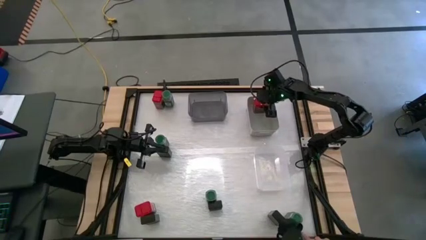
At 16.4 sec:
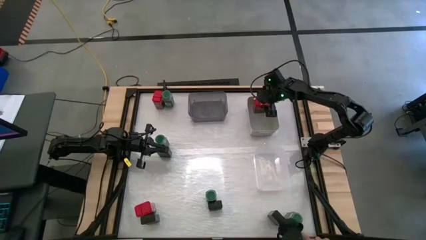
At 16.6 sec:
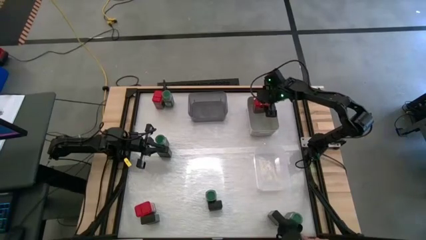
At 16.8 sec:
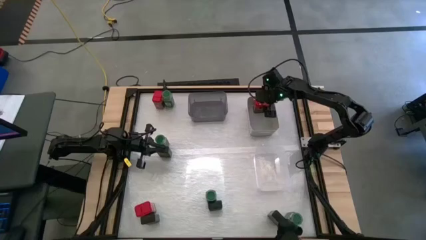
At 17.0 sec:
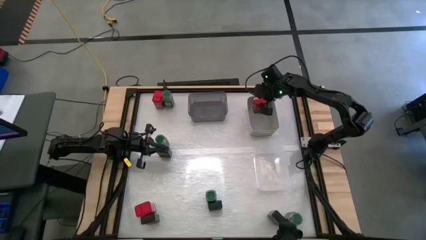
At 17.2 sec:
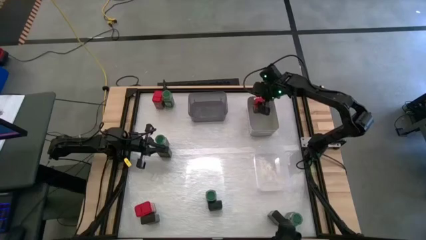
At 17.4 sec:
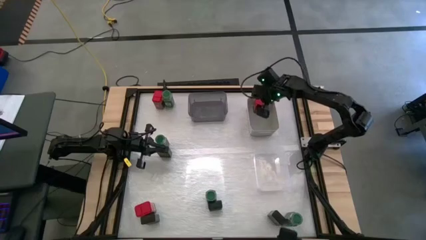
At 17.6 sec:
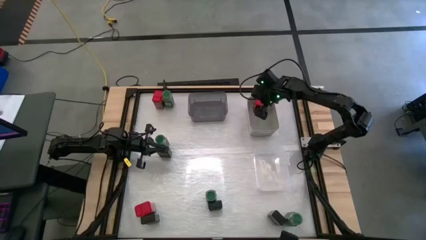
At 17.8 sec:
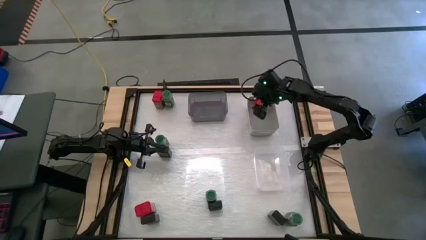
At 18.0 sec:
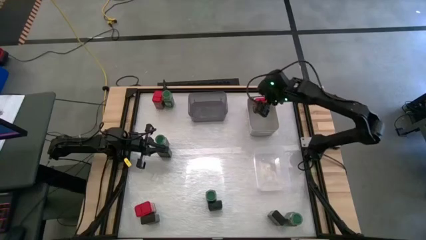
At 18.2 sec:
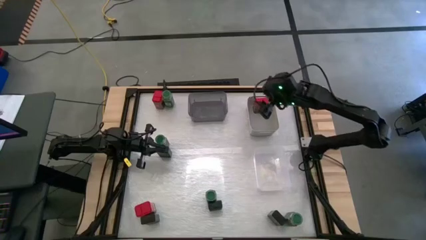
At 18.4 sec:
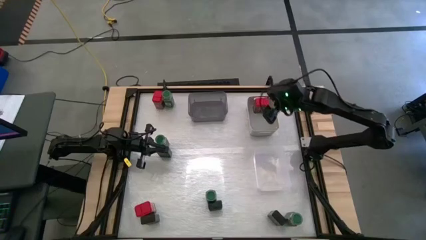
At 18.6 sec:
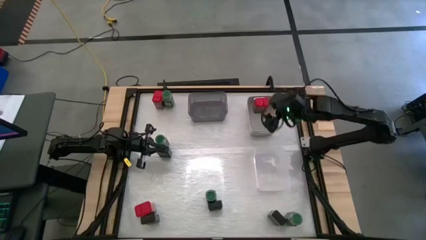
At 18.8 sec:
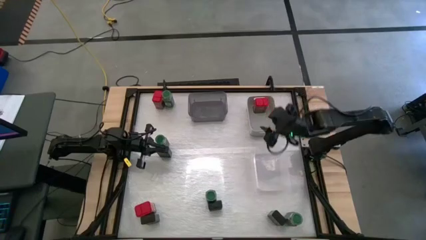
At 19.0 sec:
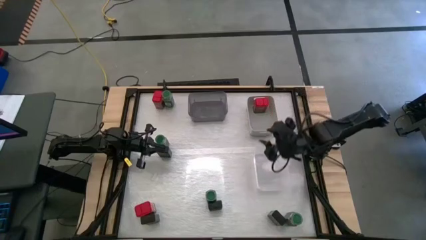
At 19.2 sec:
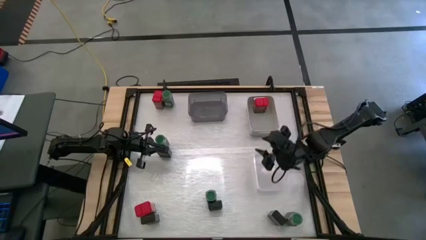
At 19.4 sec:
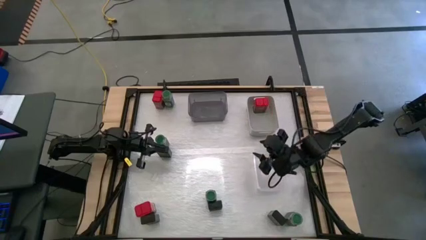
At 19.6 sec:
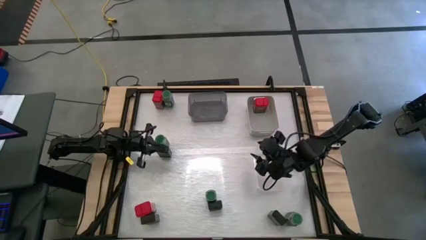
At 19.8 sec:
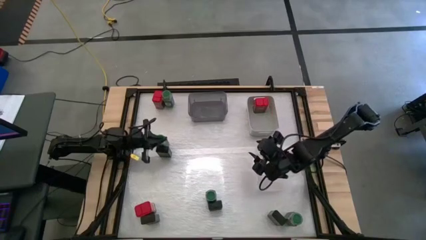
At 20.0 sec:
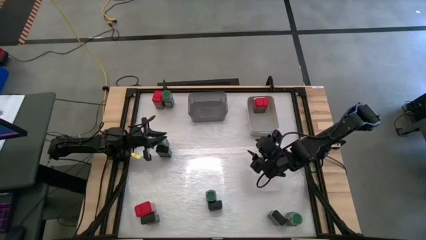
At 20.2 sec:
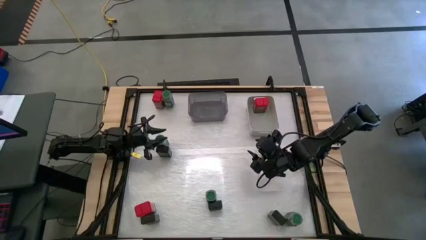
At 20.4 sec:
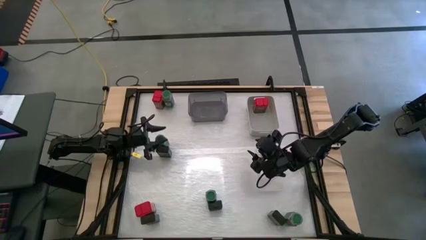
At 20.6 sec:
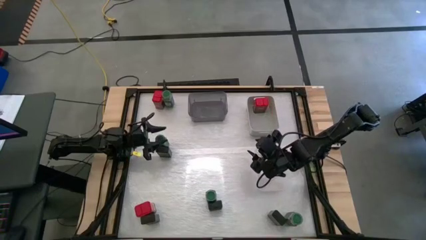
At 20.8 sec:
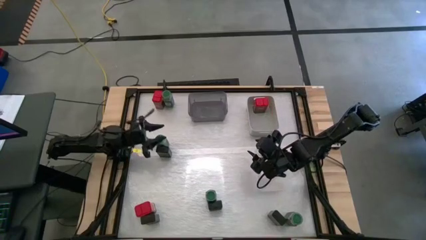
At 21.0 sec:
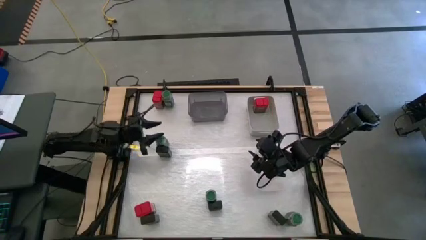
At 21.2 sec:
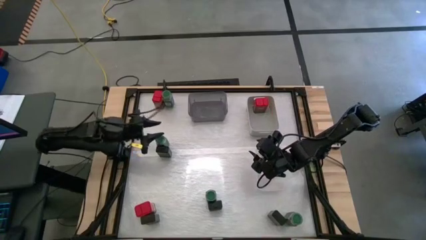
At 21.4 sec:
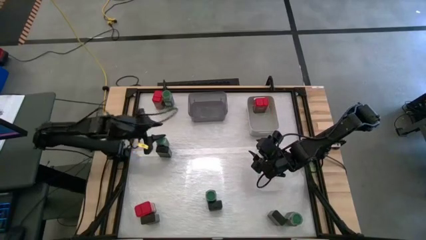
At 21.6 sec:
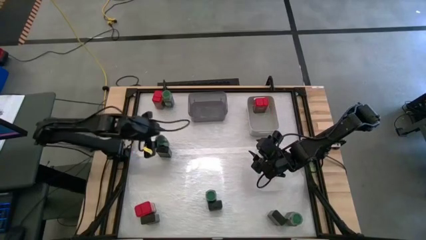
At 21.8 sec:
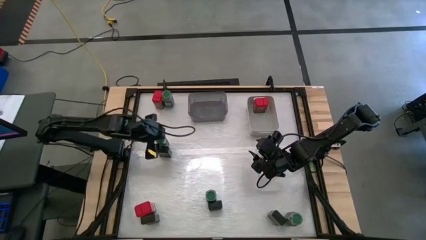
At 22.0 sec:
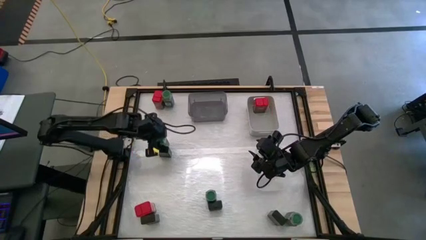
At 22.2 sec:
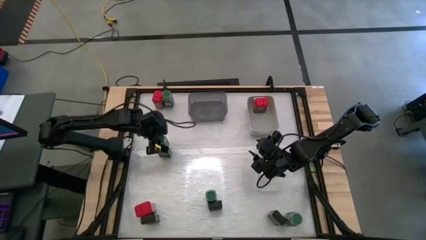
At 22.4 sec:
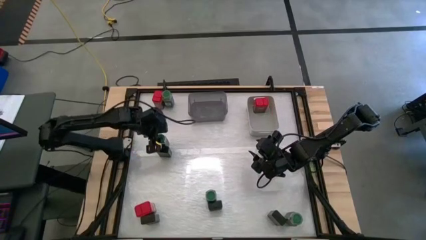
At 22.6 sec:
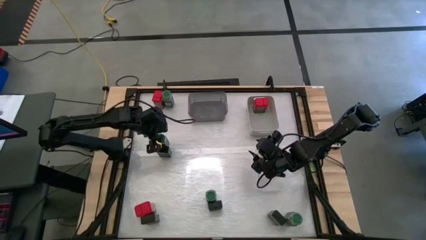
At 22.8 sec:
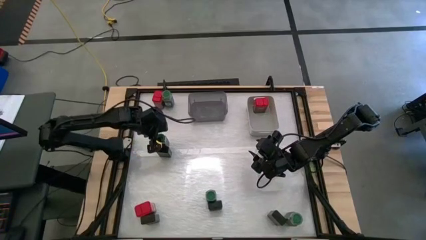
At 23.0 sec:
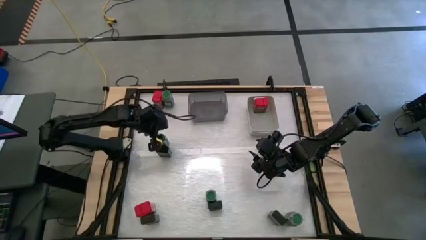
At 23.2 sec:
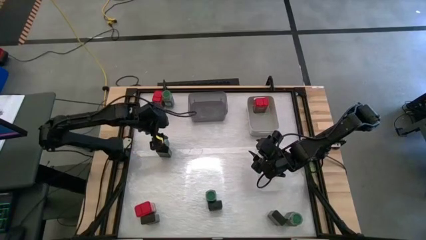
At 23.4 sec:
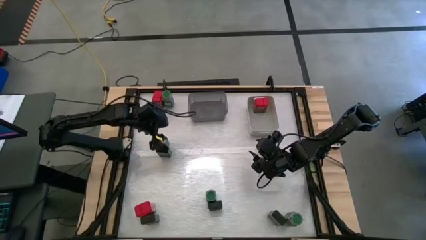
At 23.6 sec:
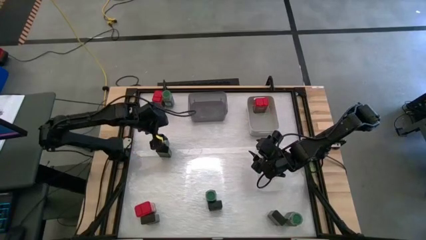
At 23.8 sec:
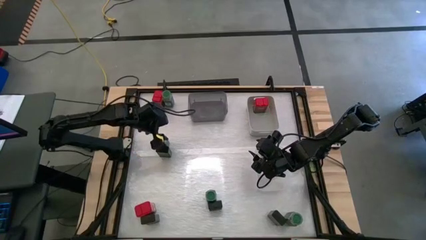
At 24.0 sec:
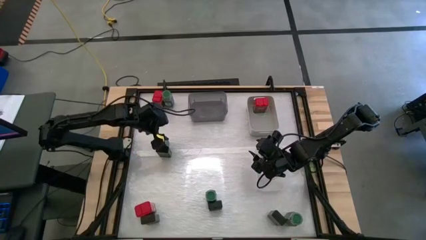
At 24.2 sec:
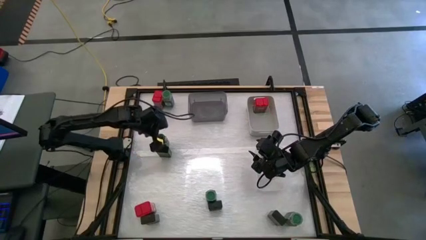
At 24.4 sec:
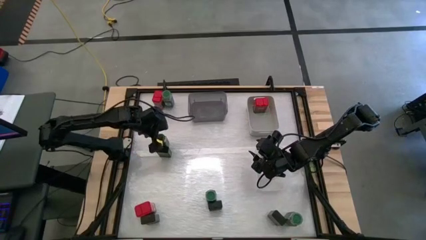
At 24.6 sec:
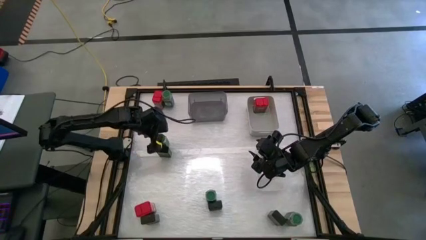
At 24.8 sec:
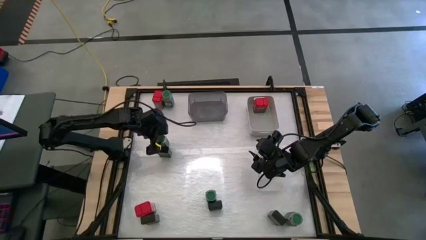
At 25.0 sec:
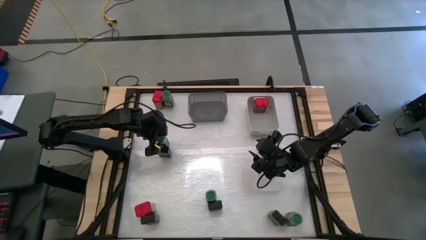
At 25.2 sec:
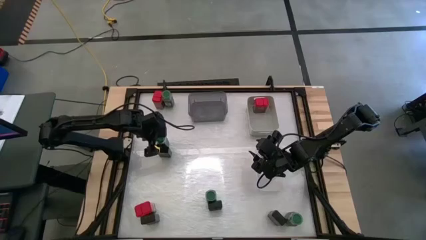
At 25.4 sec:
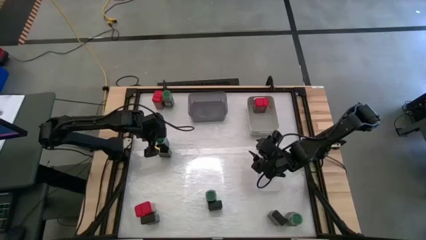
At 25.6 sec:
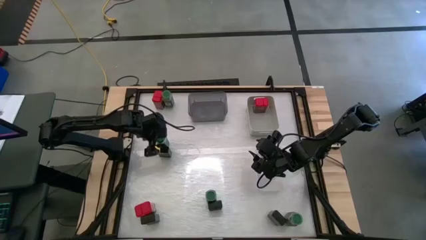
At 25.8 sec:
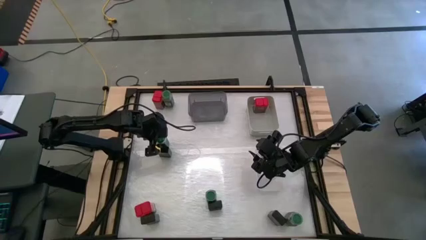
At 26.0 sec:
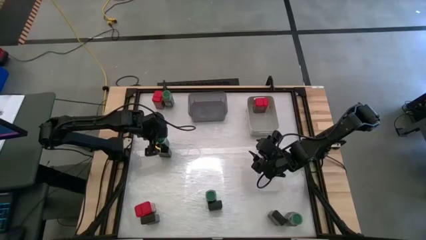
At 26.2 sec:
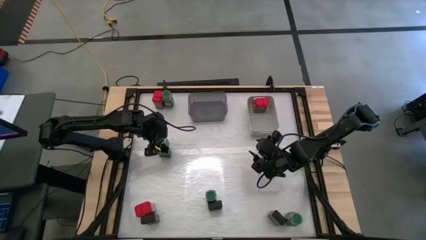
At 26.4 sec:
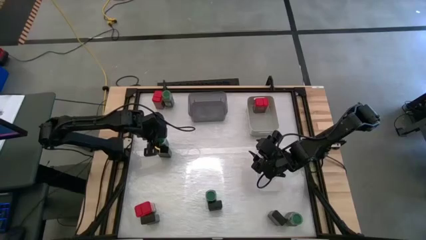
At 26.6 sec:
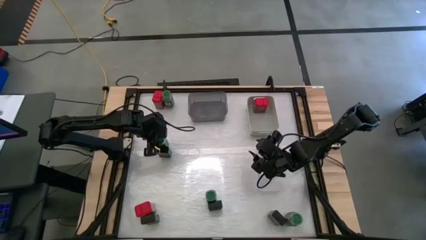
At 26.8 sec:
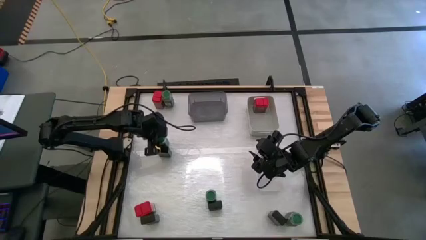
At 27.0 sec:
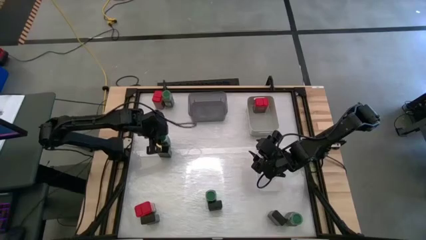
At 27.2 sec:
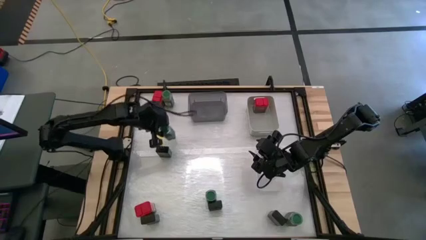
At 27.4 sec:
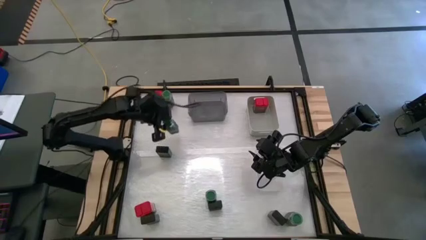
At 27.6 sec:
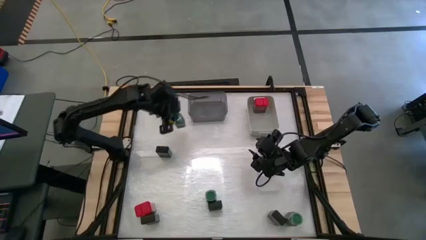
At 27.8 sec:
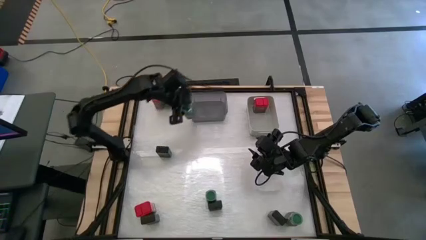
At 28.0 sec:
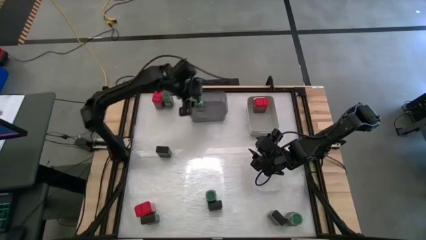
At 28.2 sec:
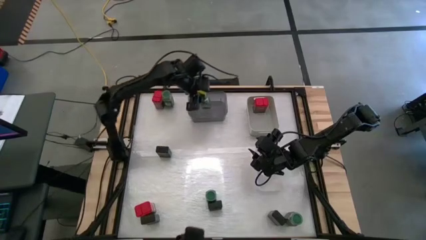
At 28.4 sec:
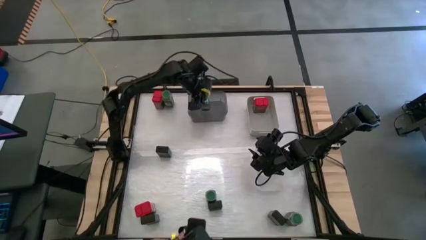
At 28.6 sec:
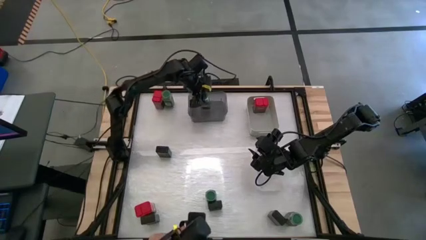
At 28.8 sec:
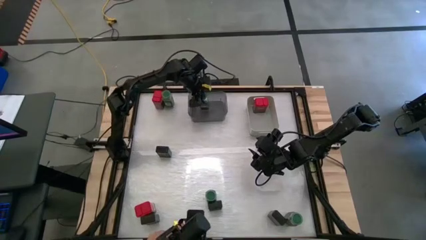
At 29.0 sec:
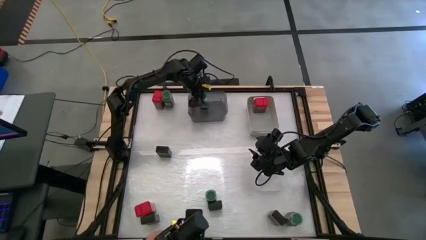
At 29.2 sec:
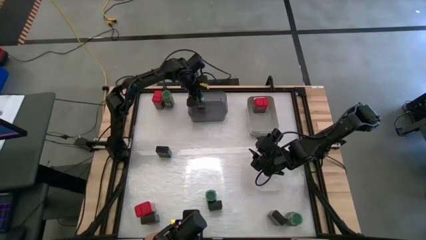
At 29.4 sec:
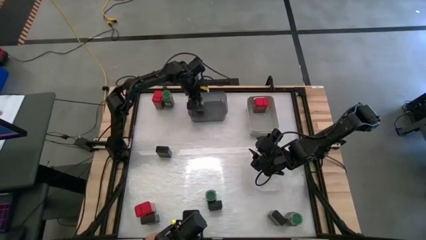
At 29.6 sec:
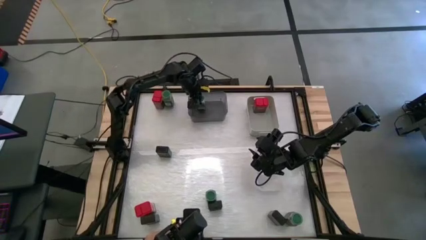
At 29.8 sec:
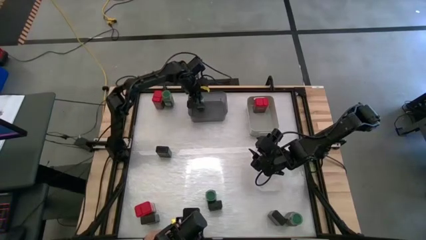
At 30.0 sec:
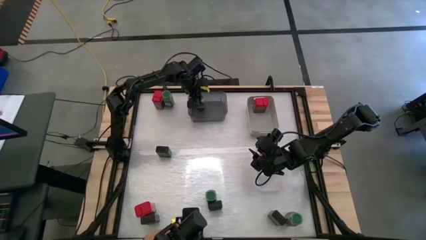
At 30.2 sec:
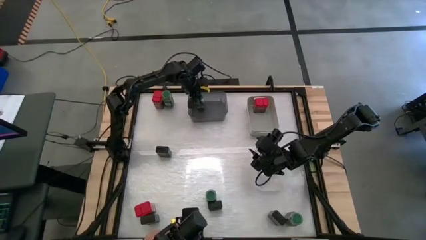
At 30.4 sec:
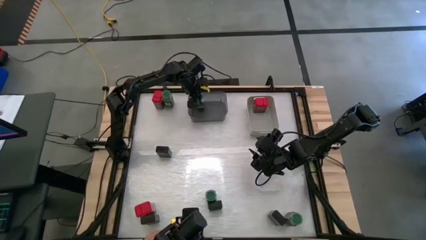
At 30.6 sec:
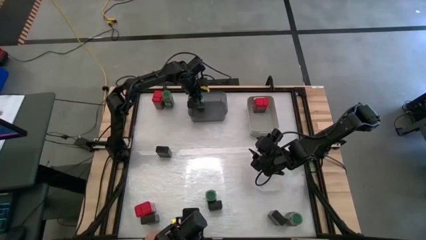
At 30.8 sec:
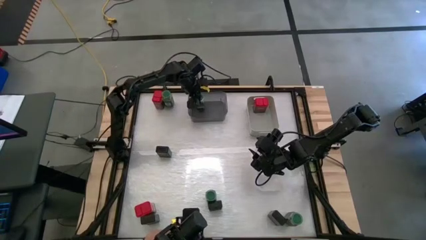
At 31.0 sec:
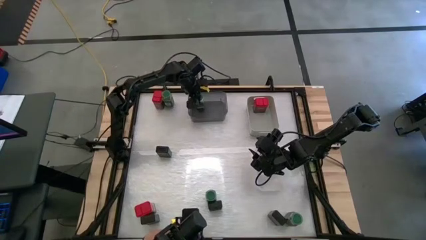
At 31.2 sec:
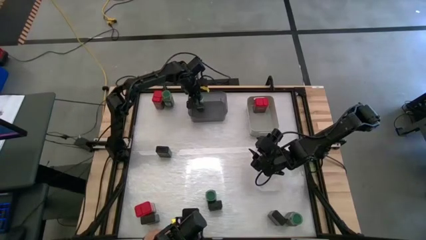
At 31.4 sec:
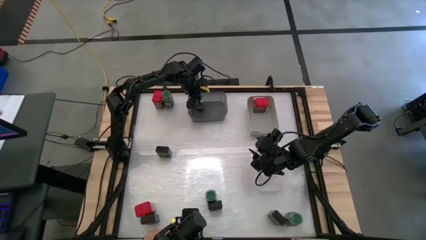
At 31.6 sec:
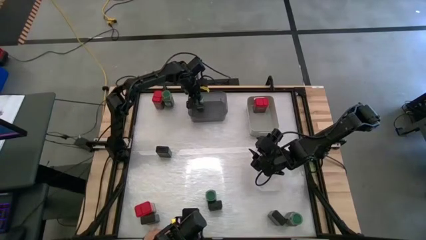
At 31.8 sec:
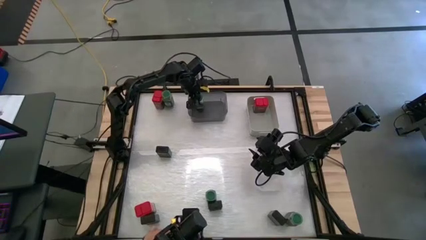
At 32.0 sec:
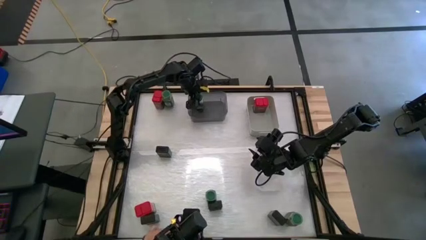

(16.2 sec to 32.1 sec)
Task: Sort spices by type
Put the middle left green seasoning bottle into the black bin
